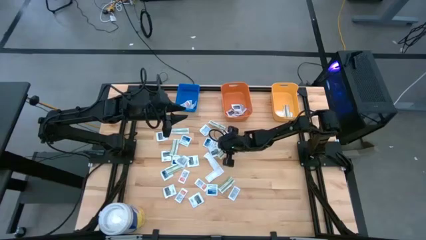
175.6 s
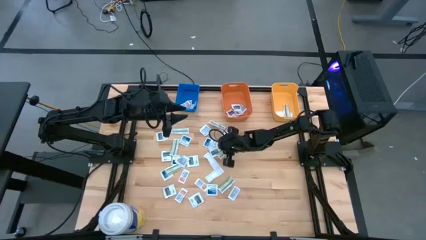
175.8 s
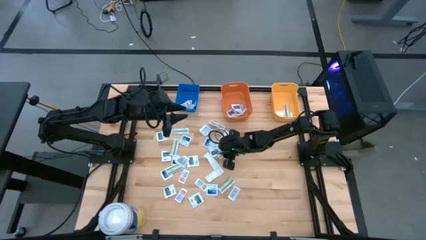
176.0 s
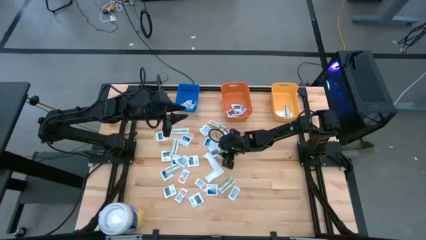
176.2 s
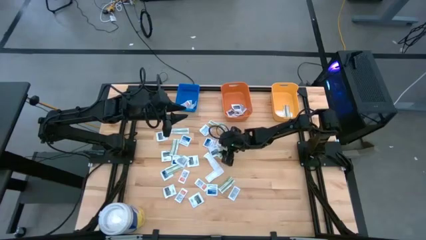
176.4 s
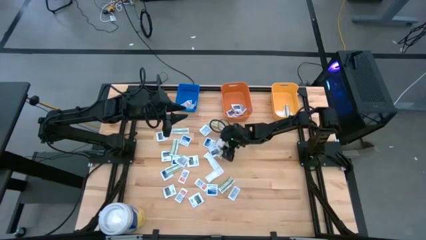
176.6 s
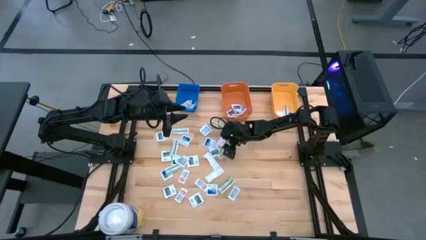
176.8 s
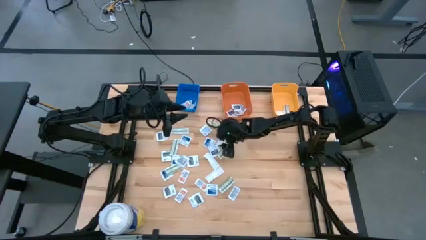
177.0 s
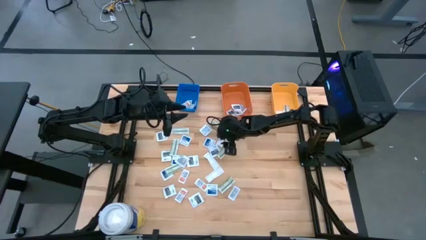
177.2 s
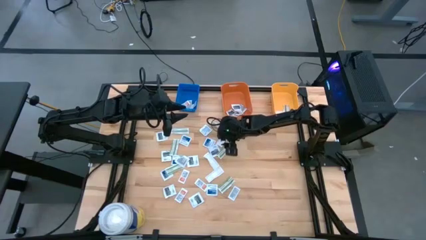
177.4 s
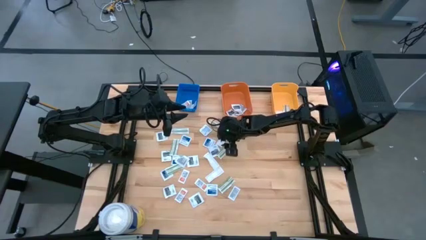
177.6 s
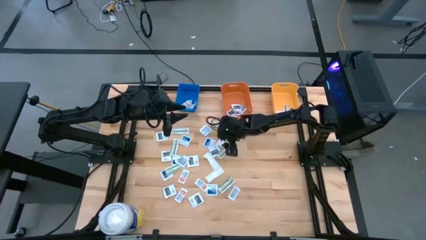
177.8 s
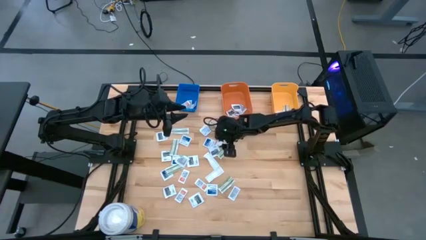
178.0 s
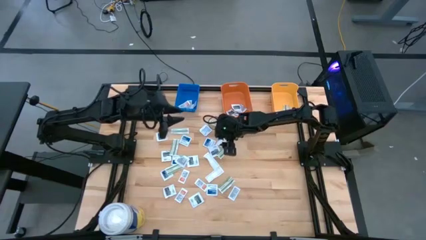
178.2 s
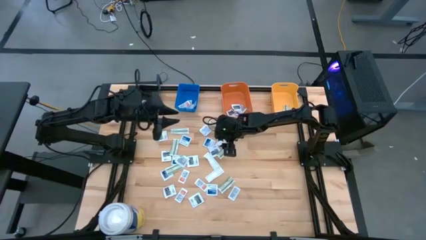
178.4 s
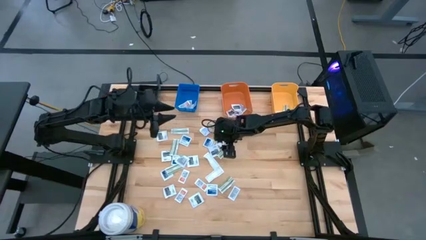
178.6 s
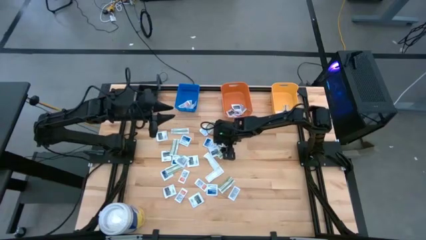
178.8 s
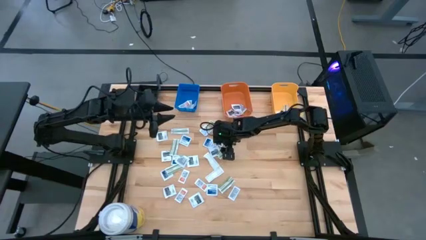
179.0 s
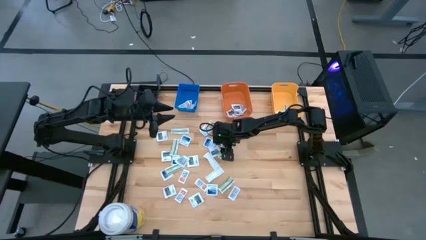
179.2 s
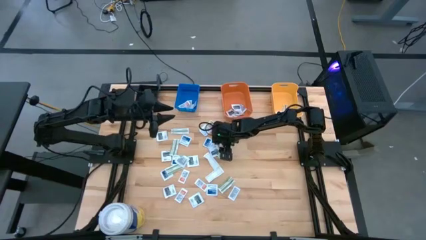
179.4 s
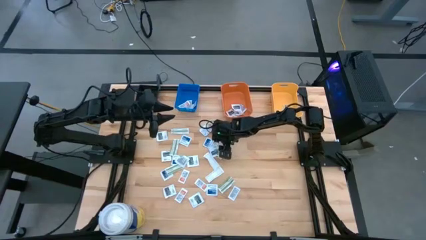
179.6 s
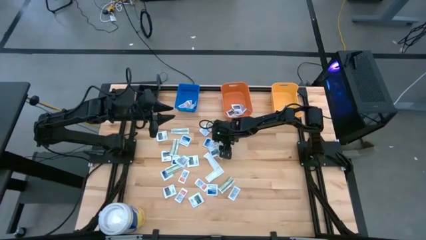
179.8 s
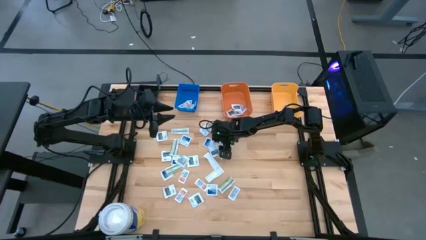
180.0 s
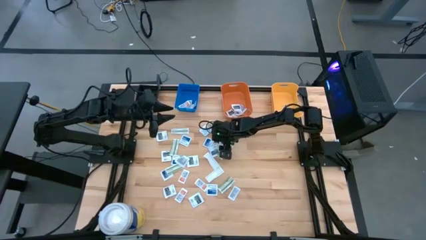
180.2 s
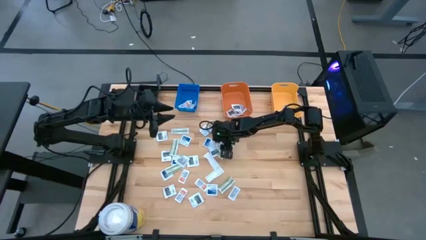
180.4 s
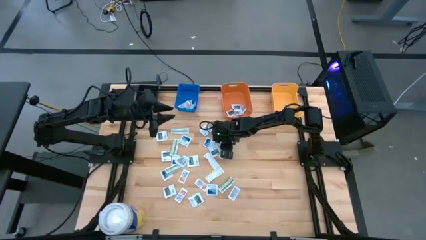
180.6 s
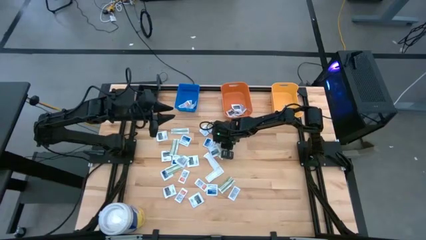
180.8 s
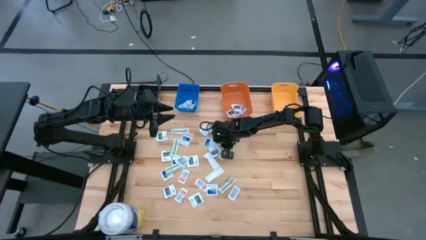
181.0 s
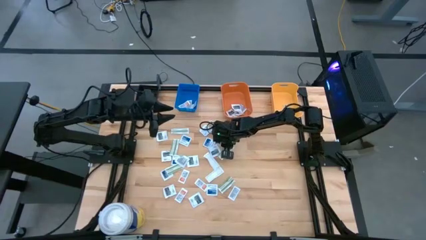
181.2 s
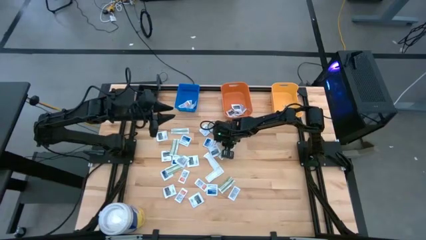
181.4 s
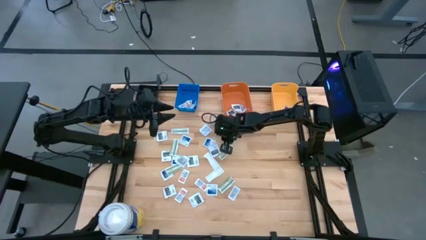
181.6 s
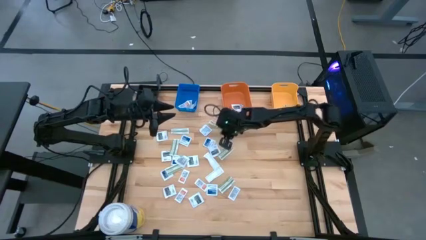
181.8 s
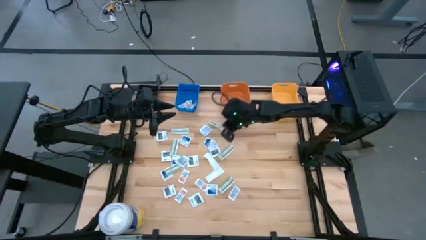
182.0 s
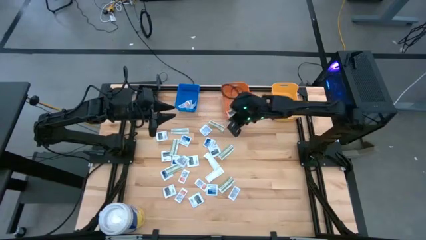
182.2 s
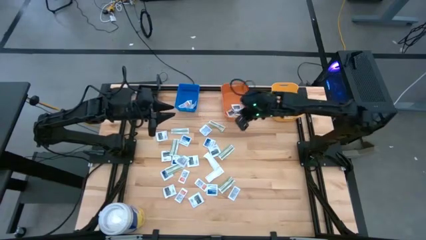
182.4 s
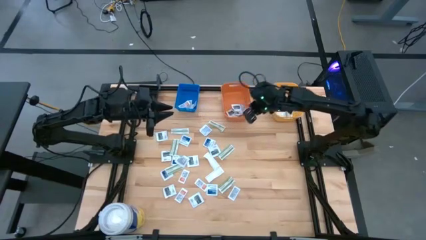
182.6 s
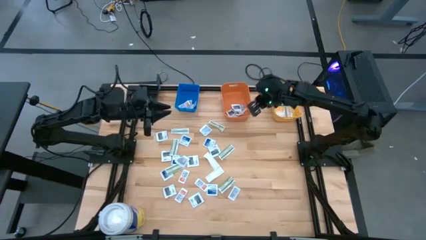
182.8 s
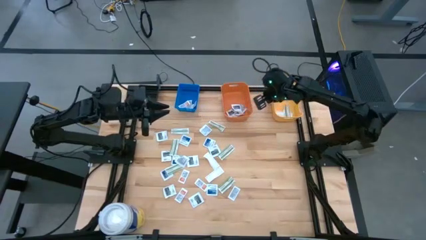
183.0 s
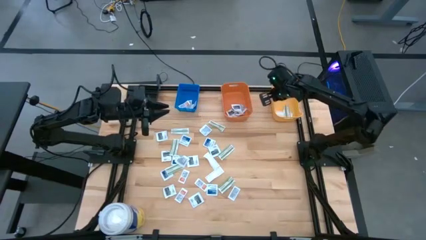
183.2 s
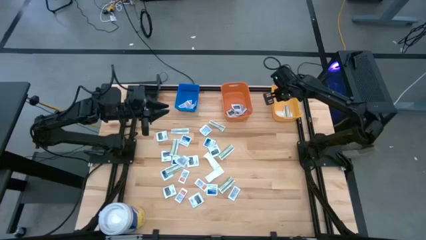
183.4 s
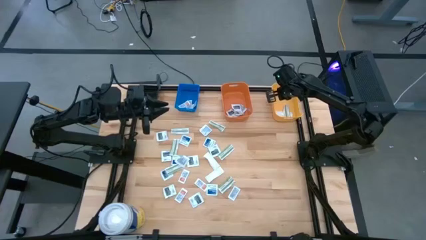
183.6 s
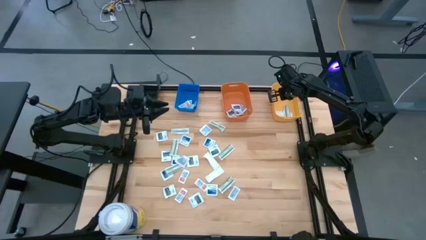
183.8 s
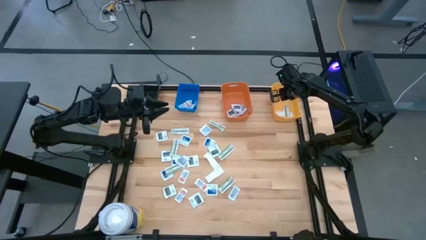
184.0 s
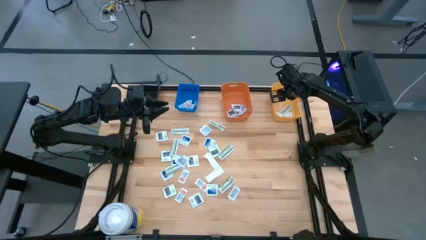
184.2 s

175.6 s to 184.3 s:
Task: Pick & Place First Aid Supplies
Put the bandage into the yellow bin

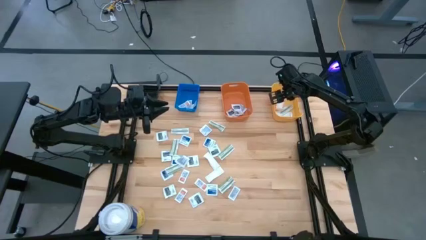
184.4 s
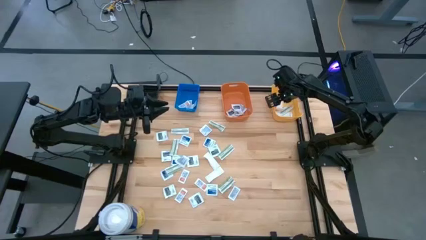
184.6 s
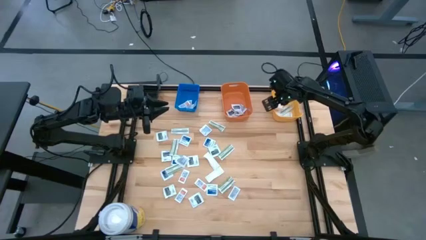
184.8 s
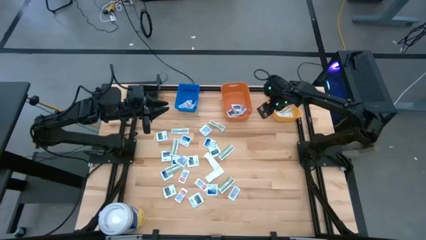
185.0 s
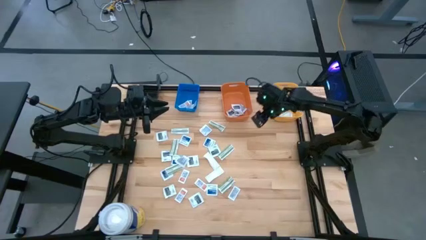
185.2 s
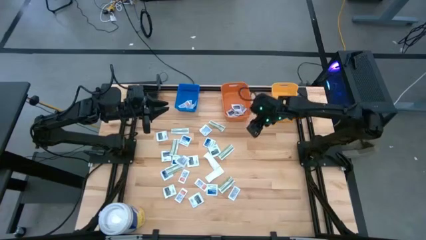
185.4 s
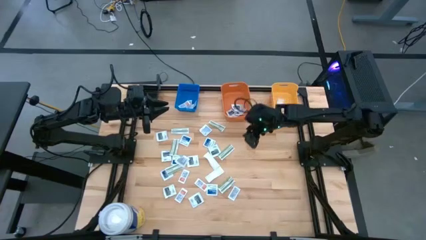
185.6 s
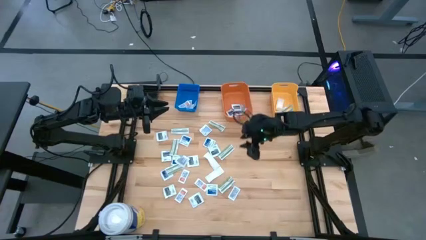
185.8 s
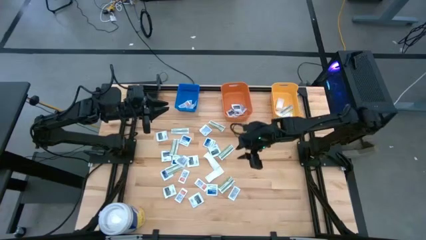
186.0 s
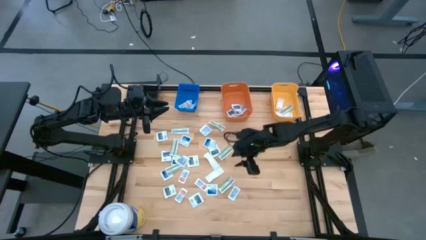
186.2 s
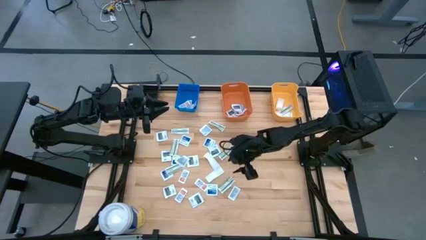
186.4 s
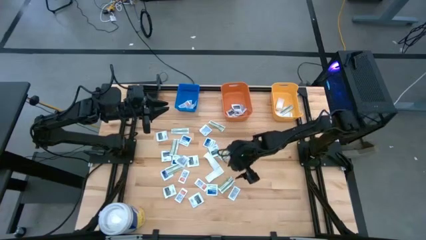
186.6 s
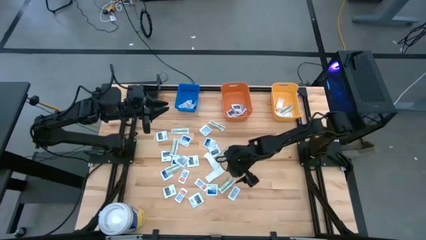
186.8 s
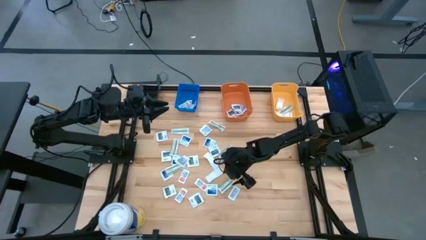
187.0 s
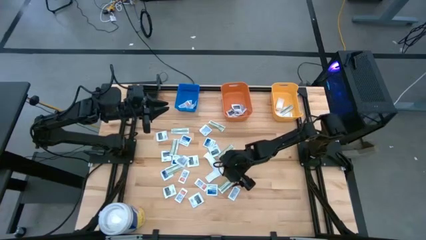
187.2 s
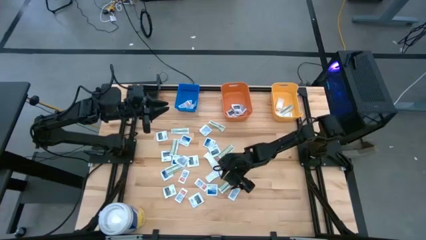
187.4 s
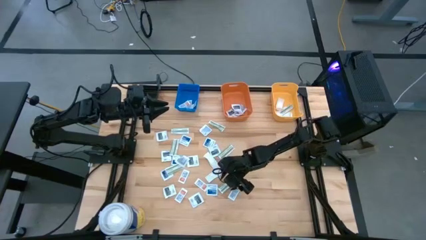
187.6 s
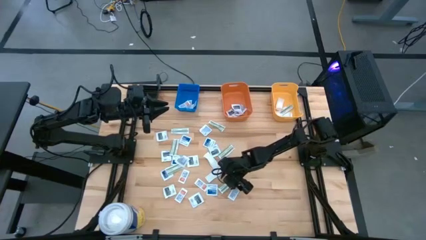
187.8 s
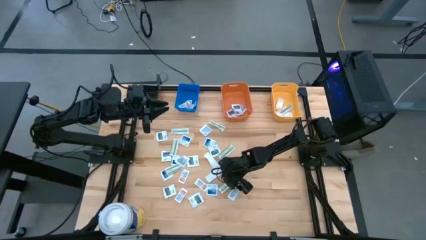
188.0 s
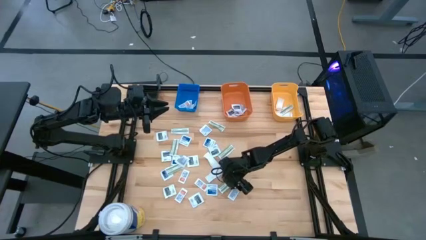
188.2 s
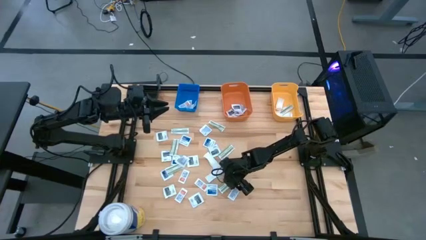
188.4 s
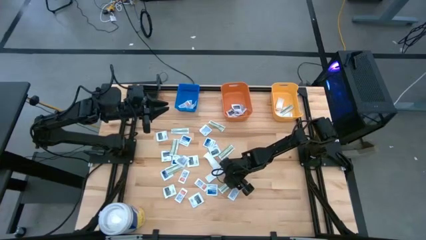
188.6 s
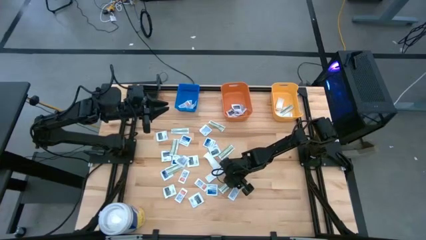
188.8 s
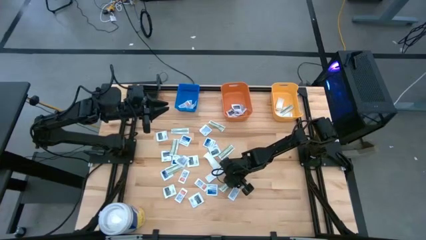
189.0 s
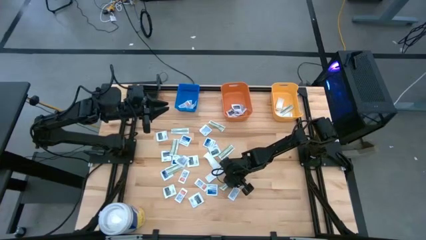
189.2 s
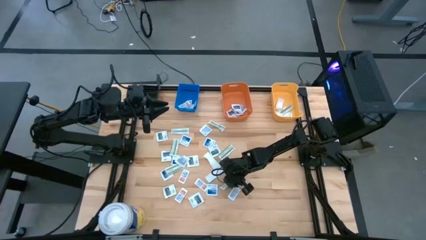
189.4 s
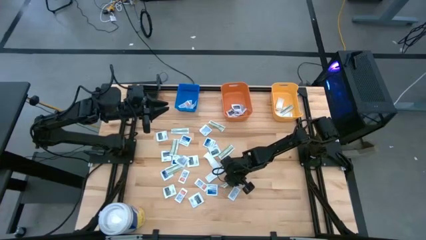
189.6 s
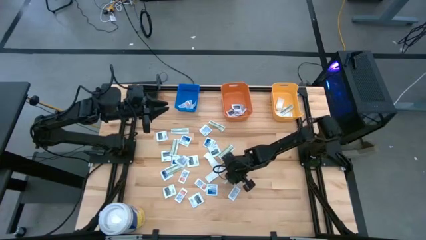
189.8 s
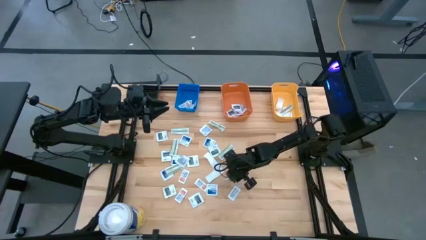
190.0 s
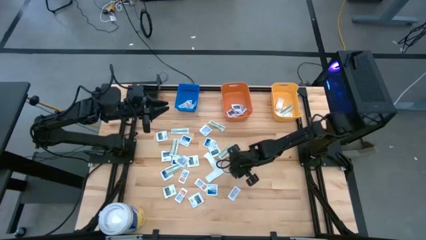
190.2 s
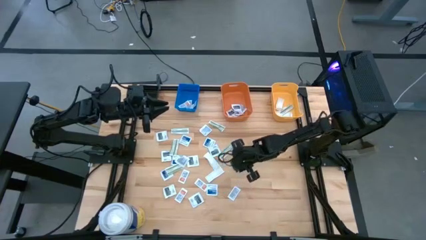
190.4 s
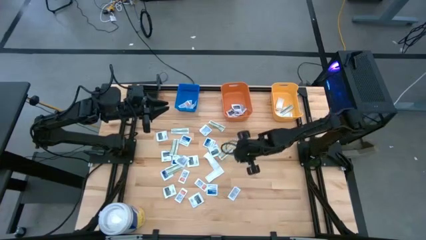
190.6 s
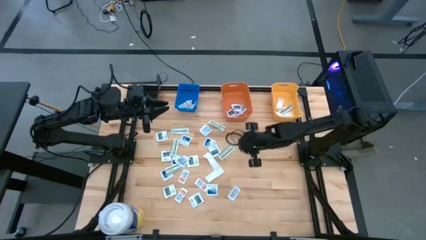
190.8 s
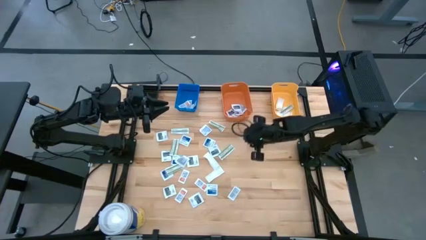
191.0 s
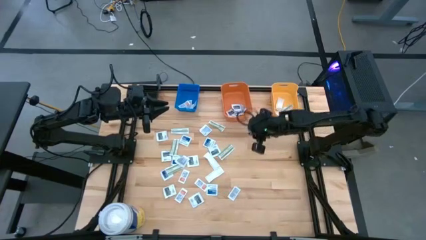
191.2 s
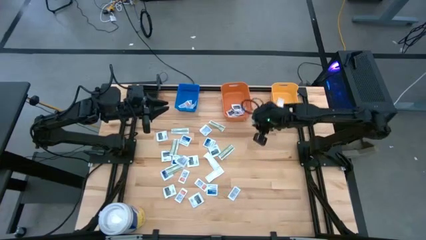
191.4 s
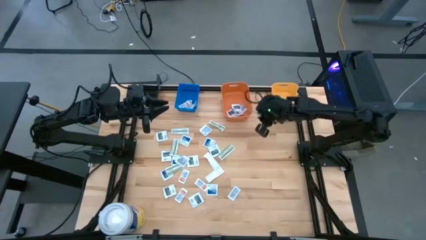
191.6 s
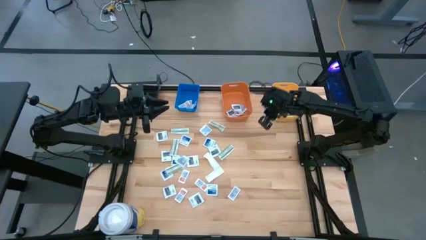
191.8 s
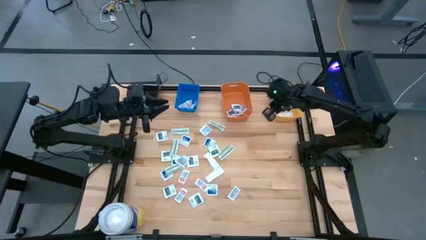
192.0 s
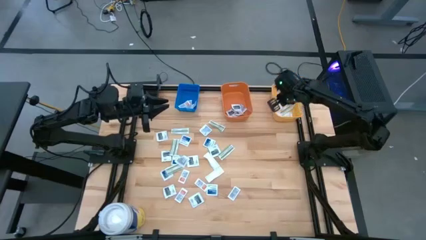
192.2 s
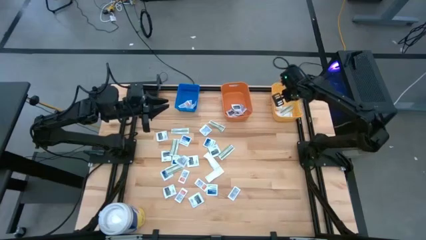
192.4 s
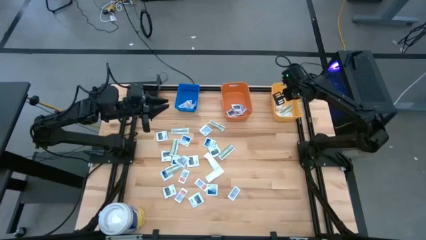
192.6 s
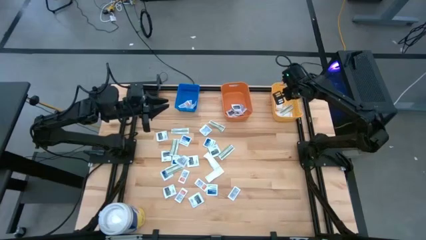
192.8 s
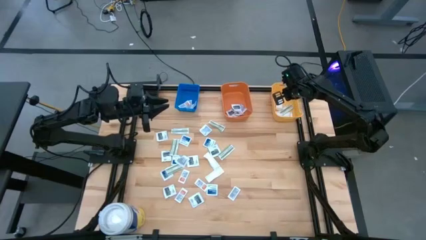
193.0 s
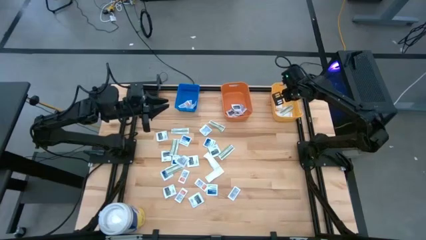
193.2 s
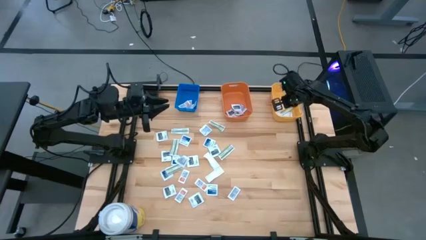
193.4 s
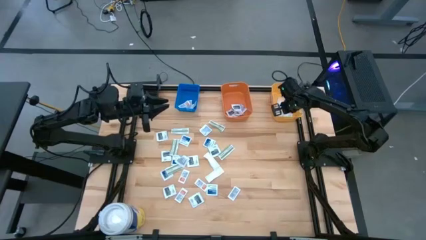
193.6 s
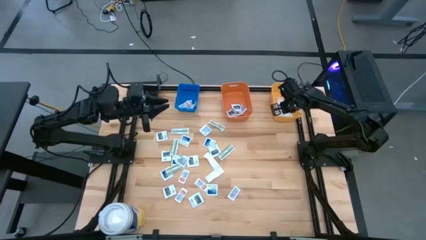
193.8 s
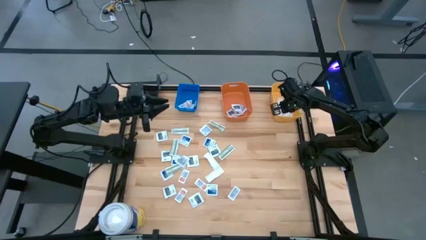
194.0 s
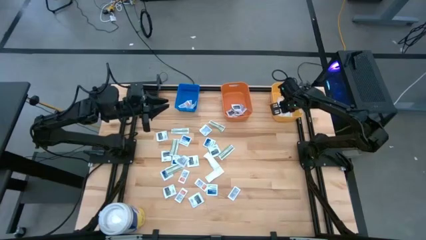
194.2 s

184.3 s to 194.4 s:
Put the bandage into the yellow bin
